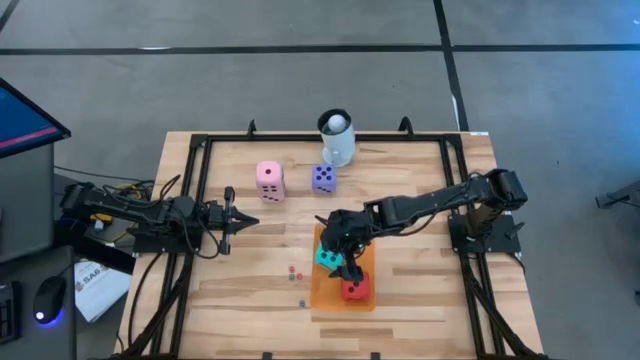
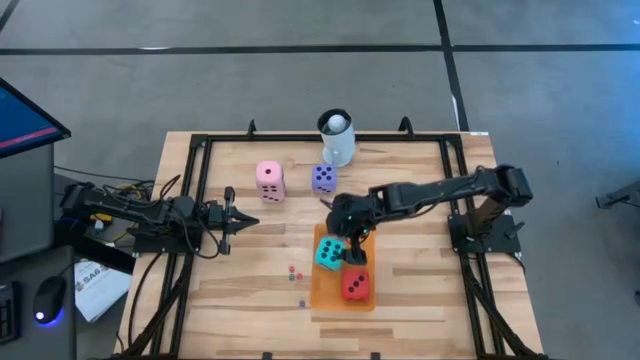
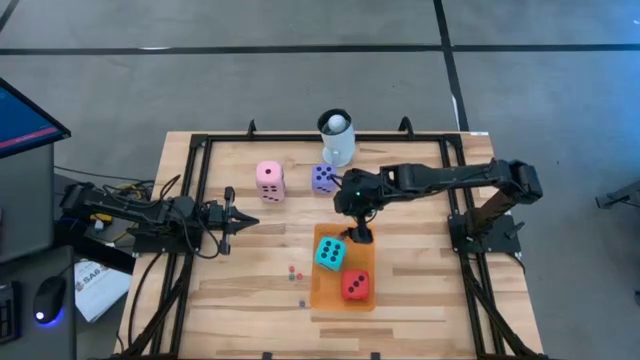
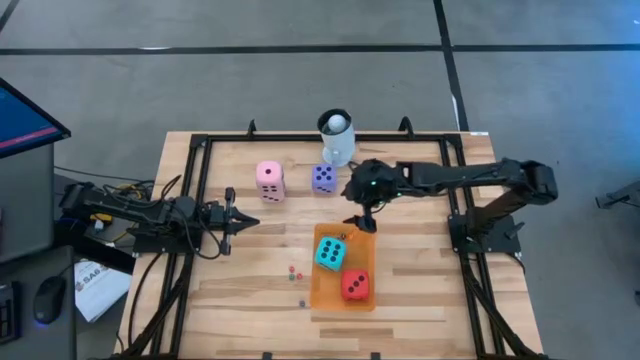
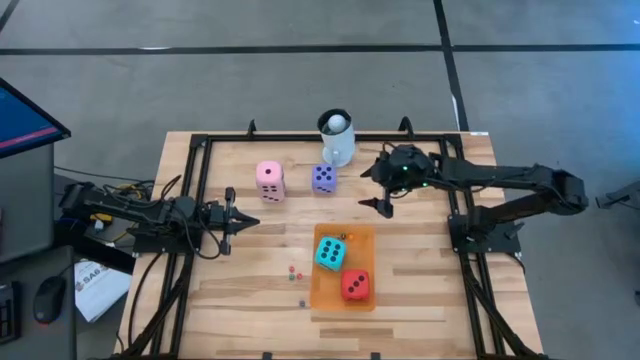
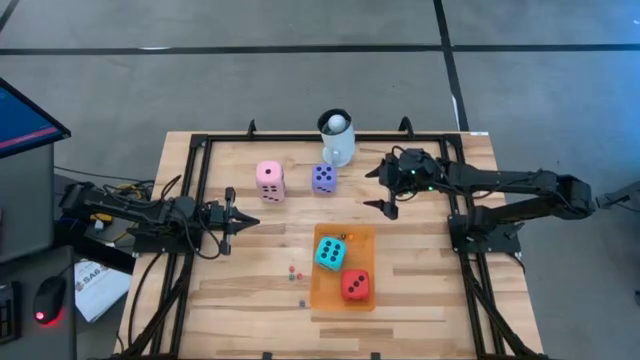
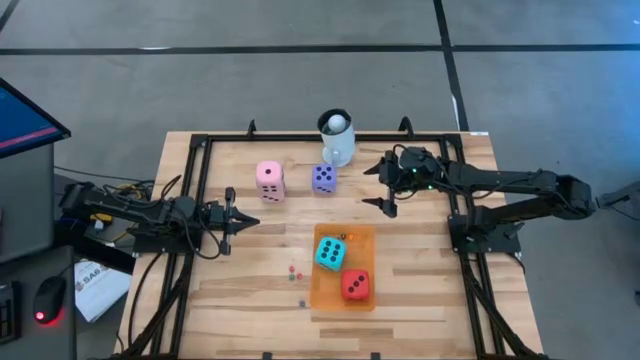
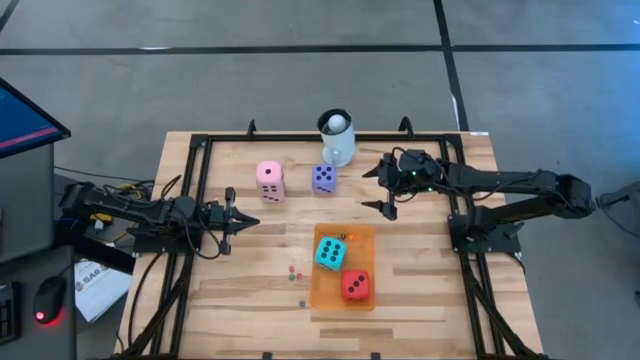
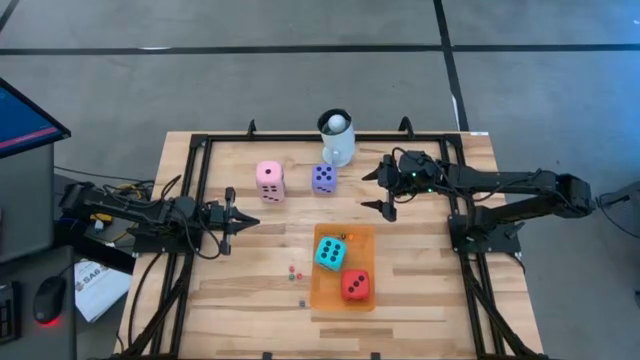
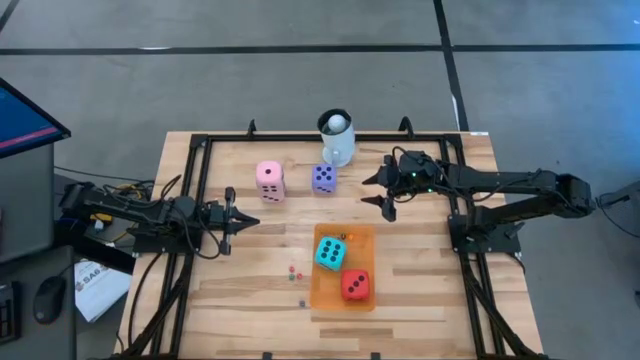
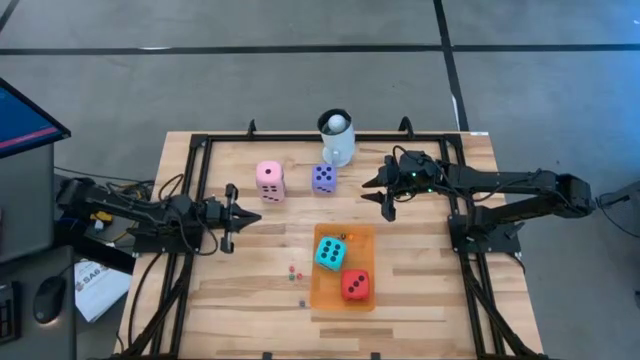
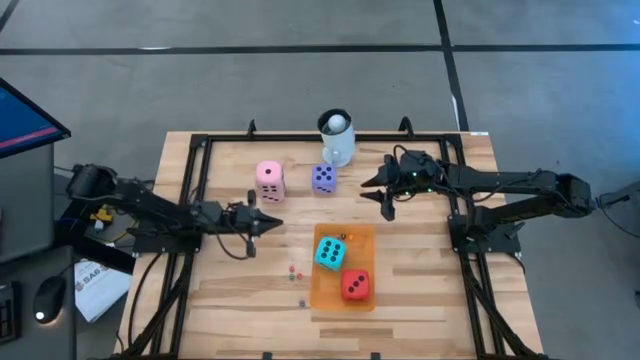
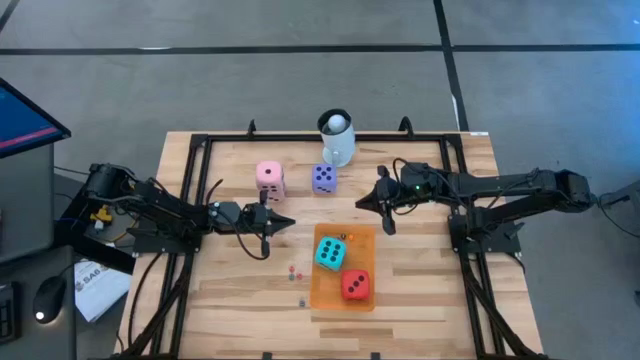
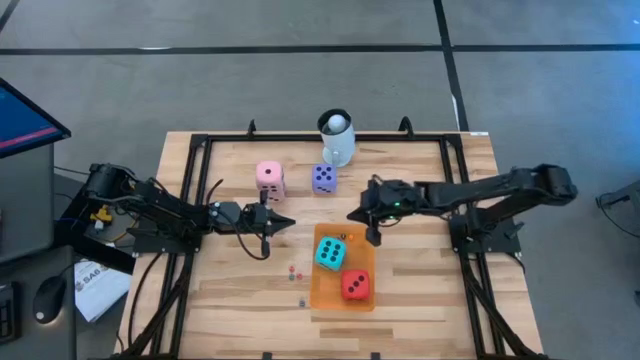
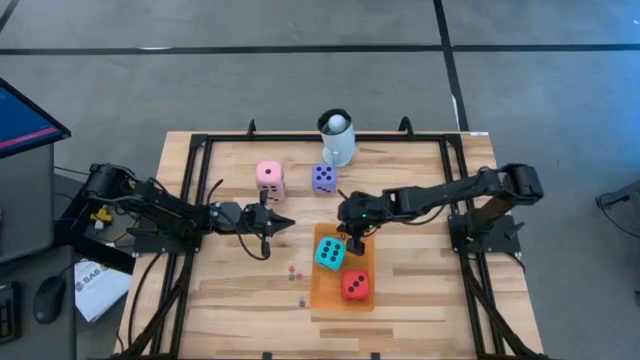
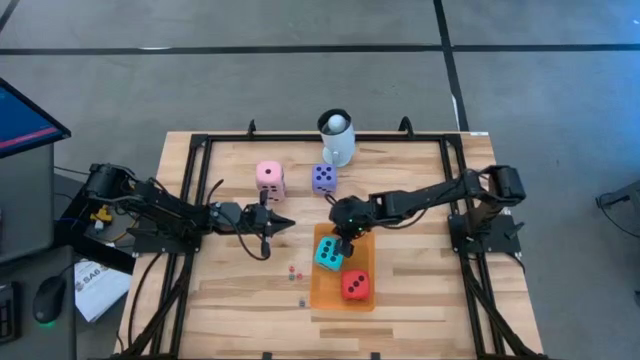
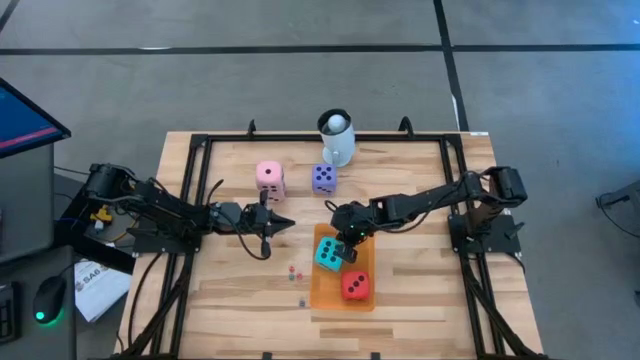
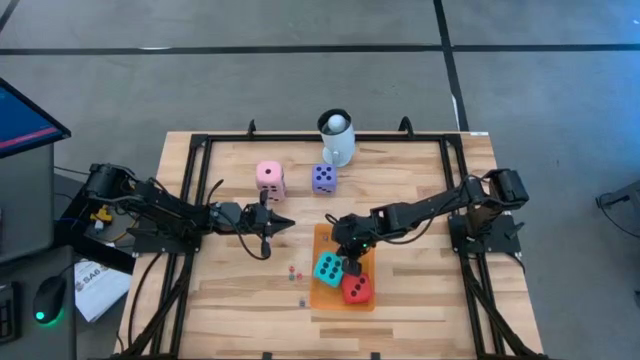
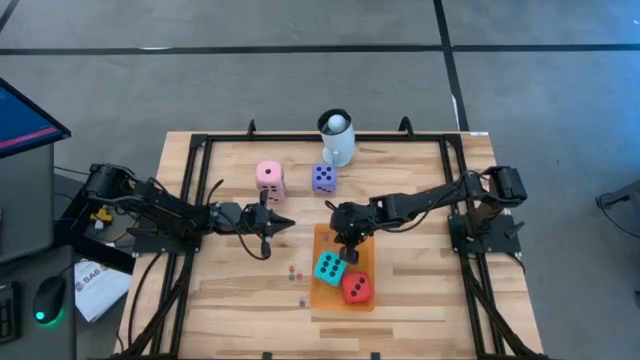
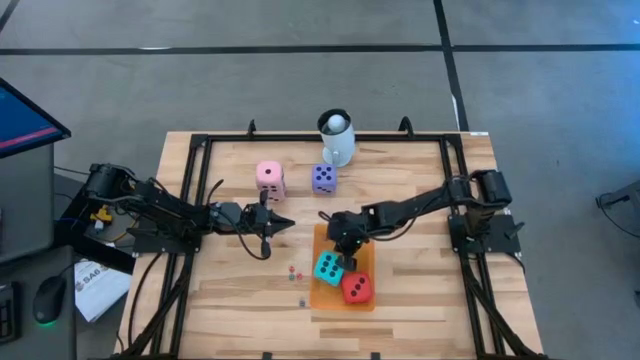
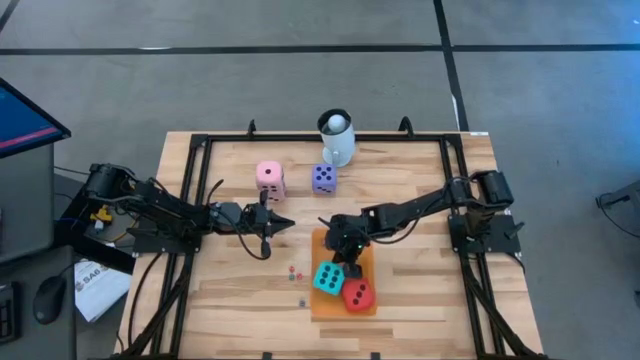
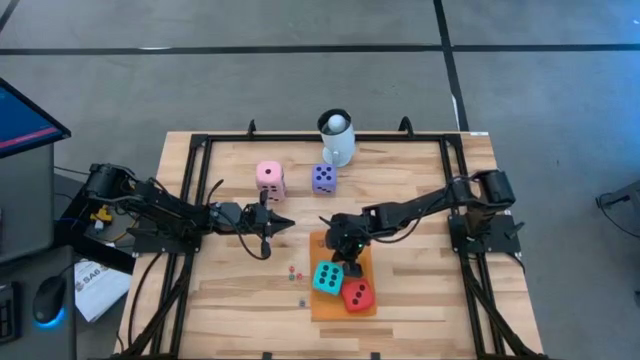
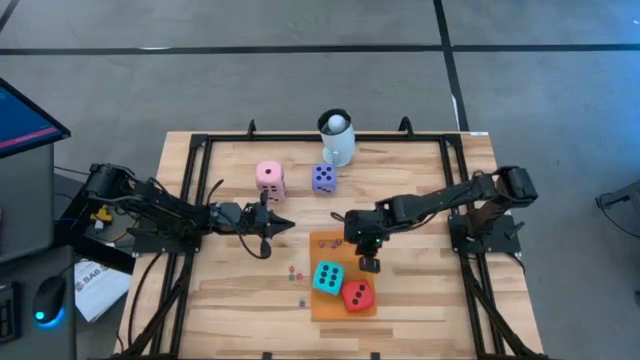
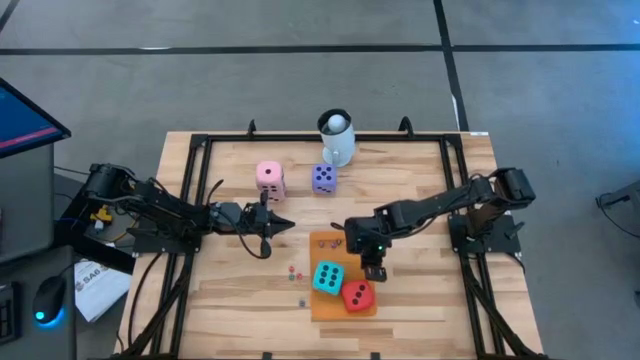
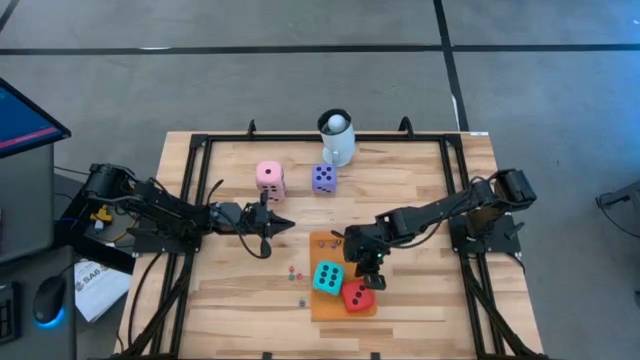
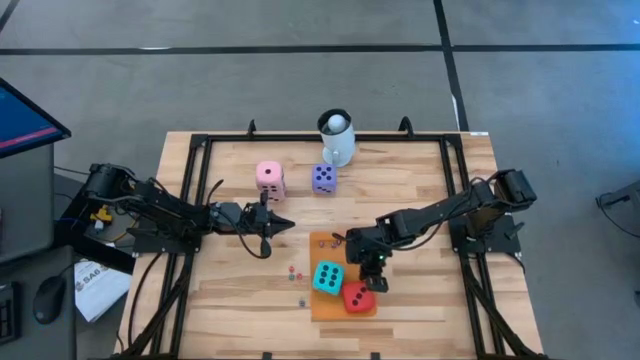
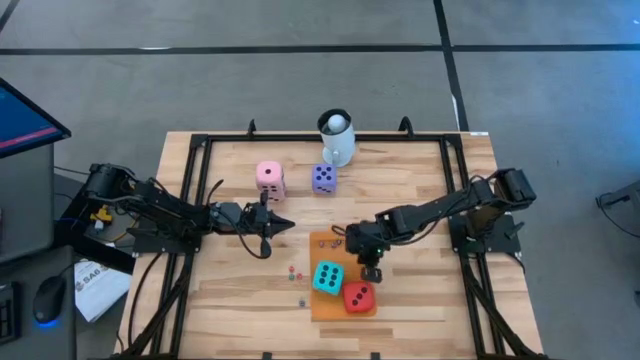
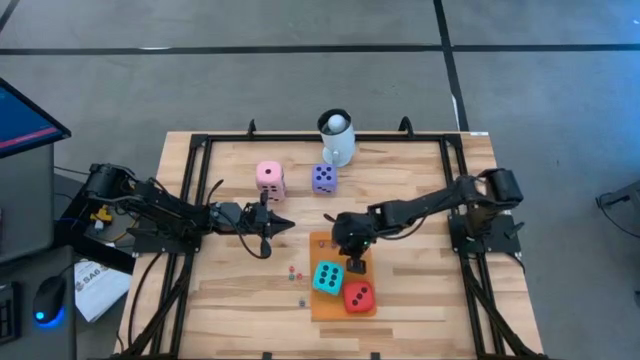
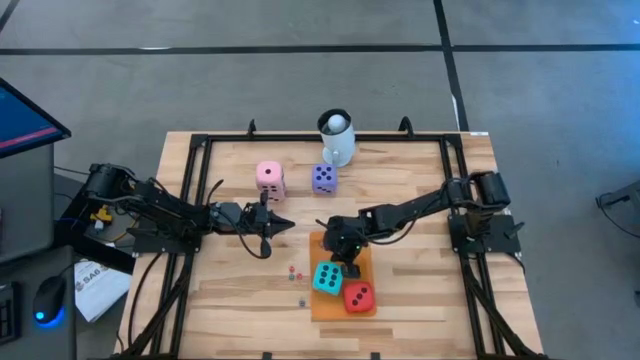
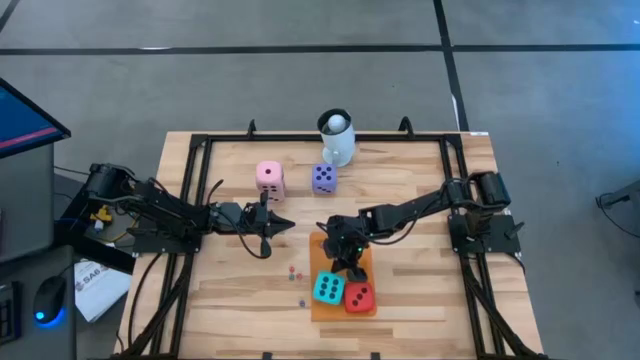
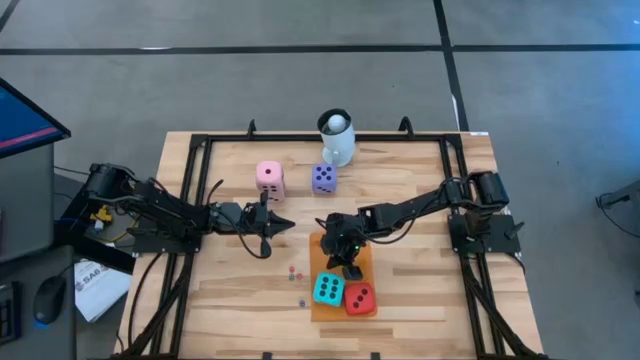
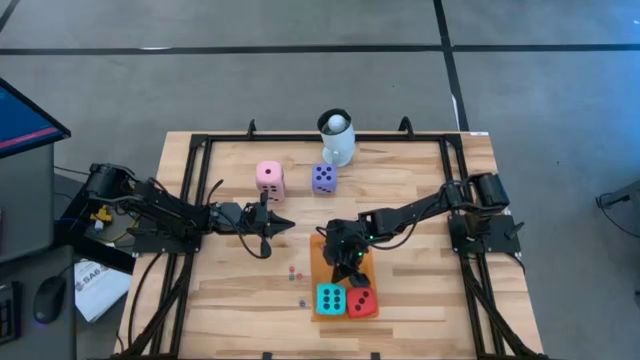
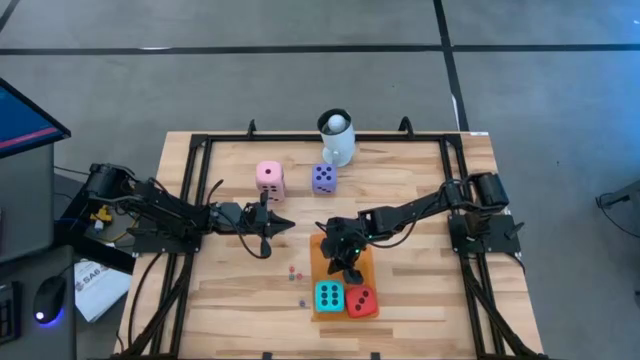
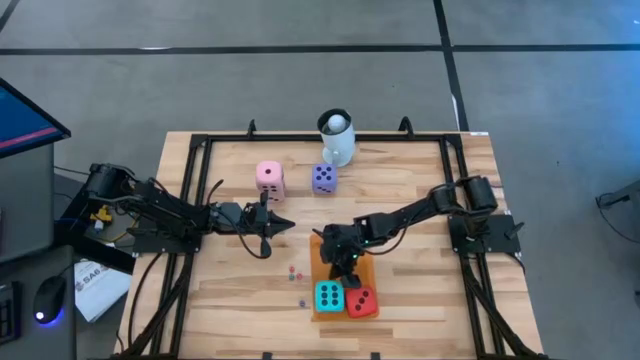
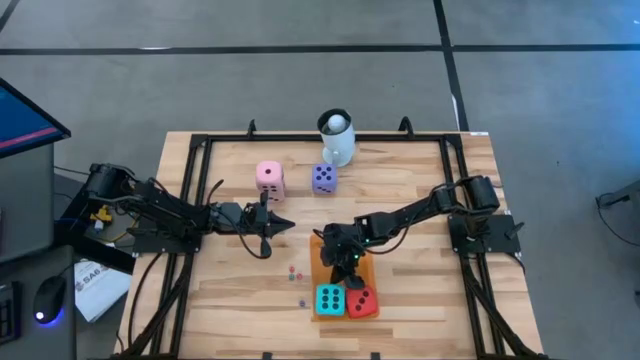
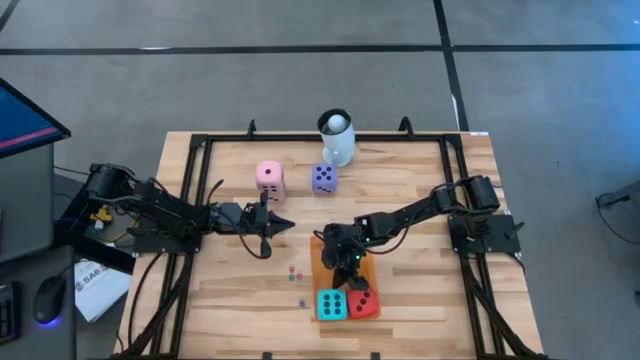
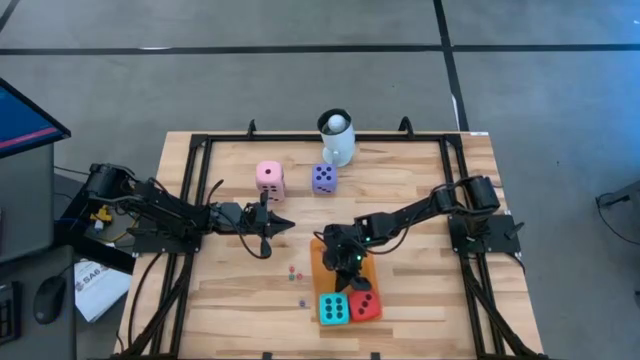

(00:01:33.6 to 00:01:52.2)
Task: Pick & Place Dice
Adjust the dice in the orange bin

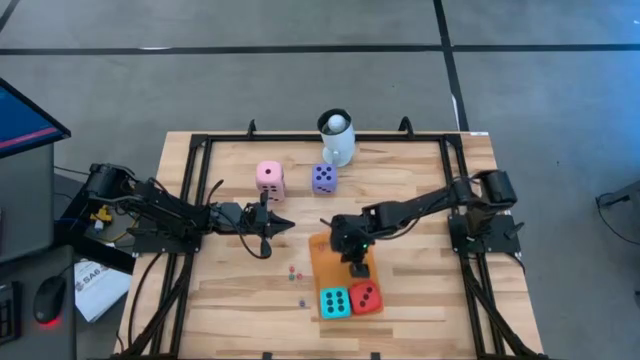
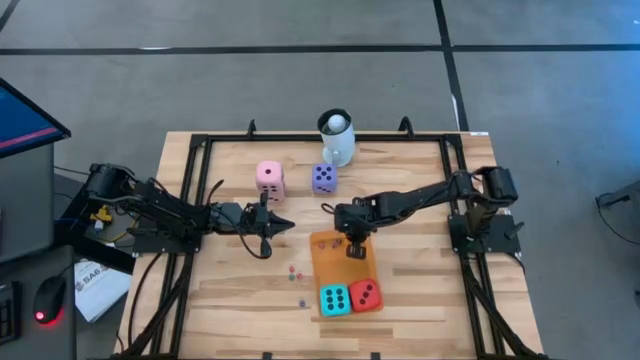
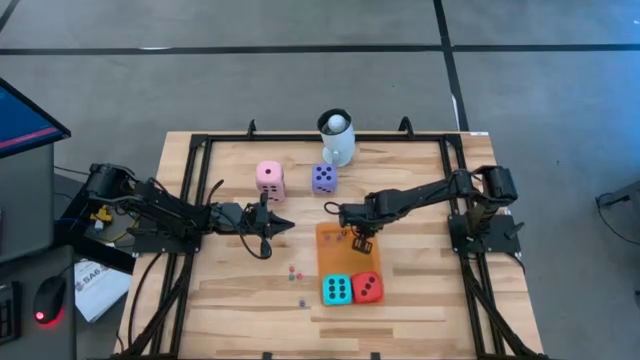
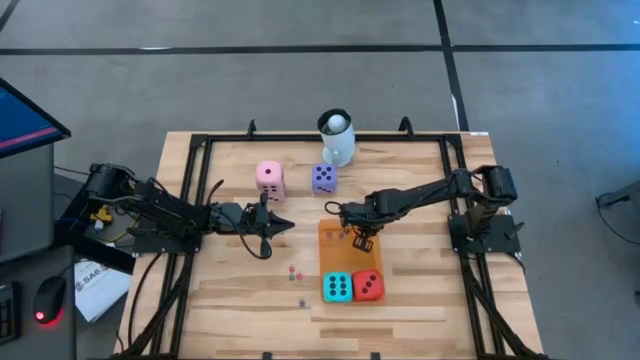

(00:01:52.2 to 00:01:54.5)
Adjust the orange bin on the table

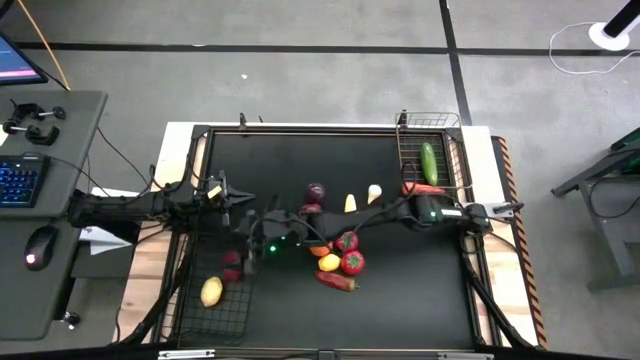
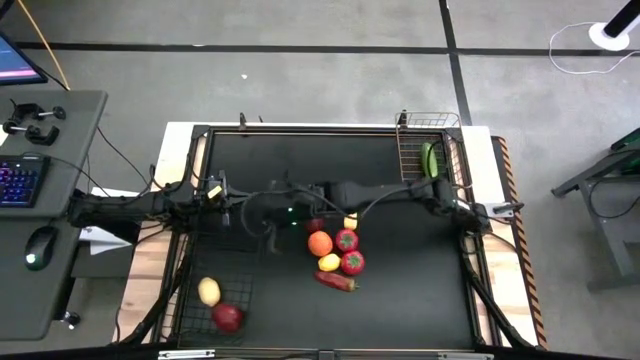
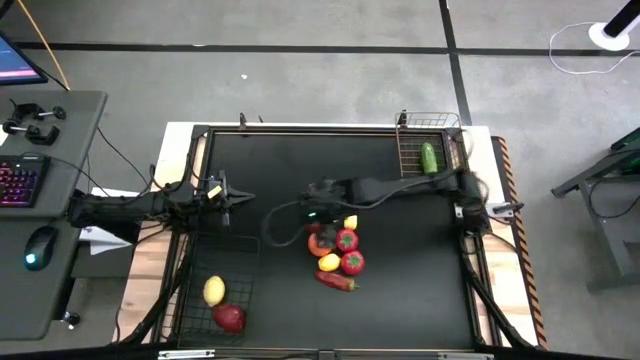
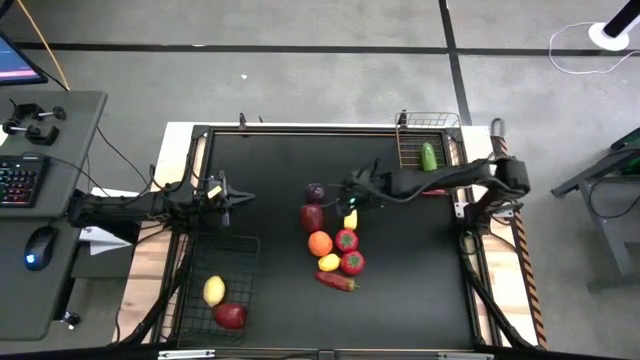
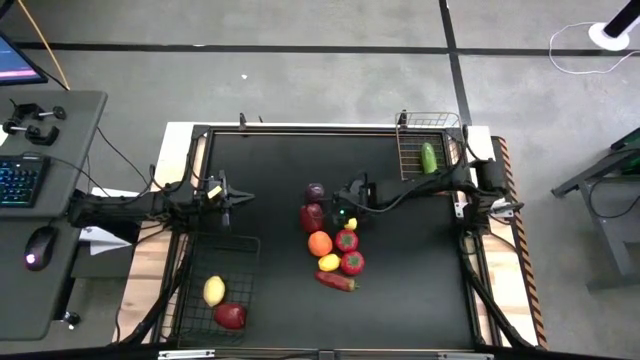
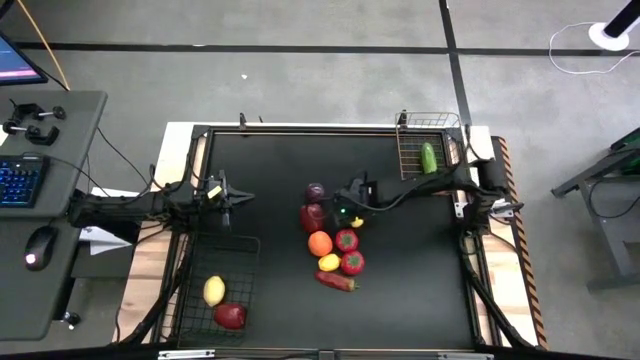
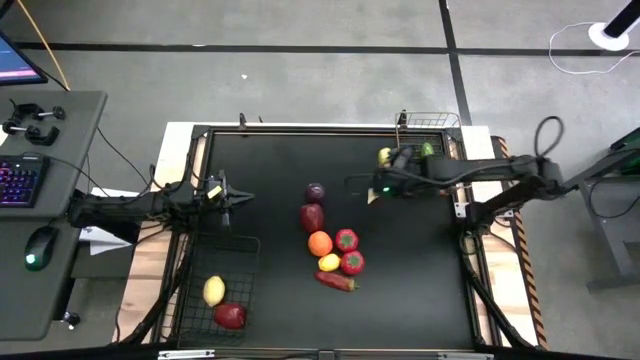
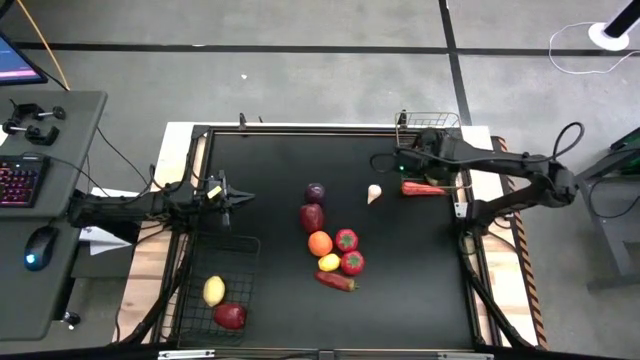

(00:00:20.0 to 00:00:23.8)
Task: Sort produce into baskets
Put the corn into the right wire basket
